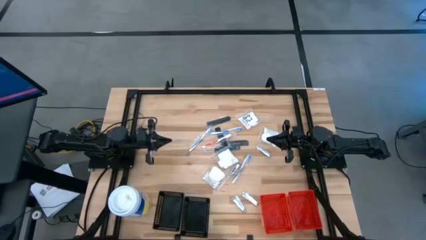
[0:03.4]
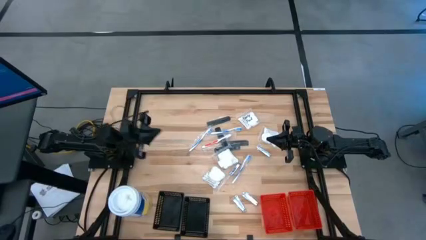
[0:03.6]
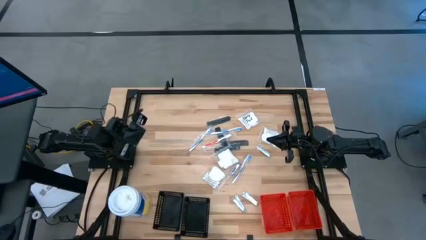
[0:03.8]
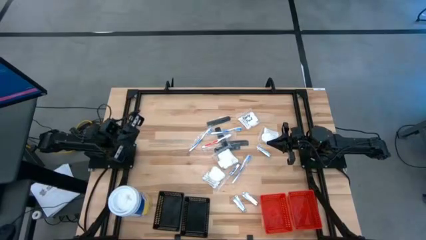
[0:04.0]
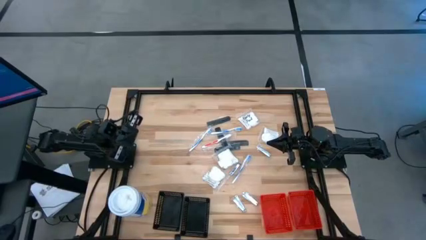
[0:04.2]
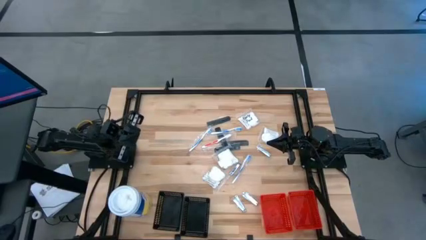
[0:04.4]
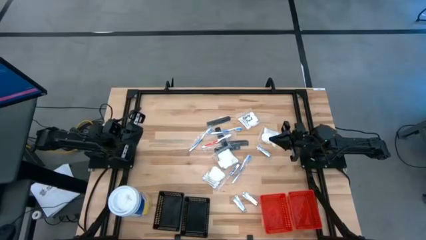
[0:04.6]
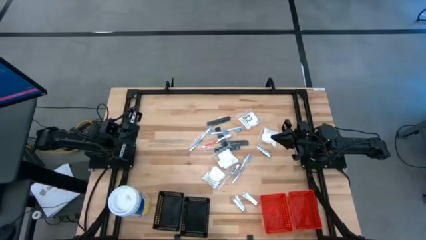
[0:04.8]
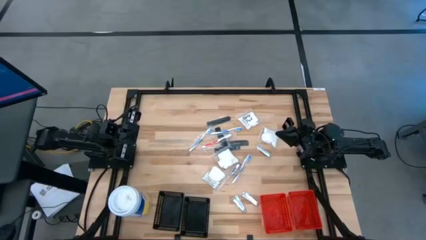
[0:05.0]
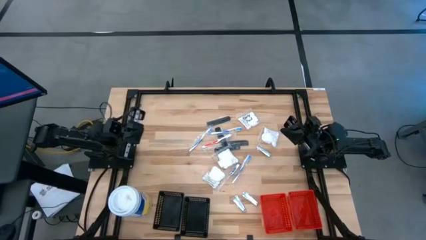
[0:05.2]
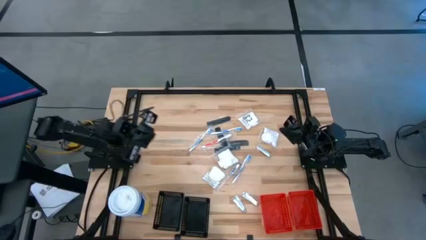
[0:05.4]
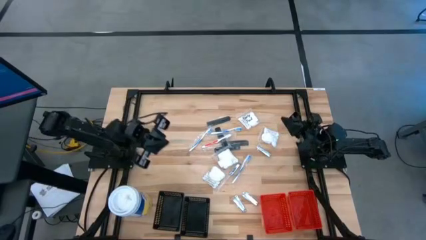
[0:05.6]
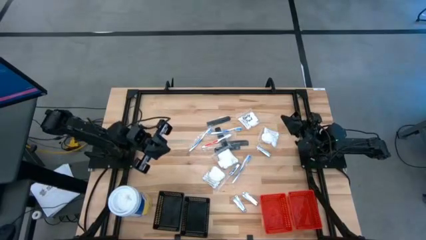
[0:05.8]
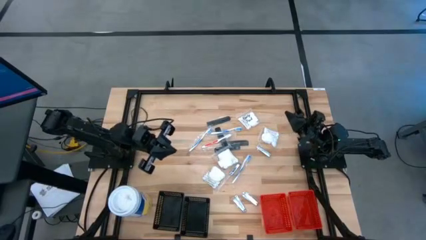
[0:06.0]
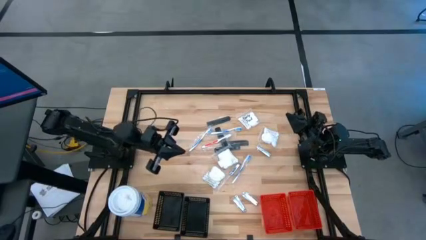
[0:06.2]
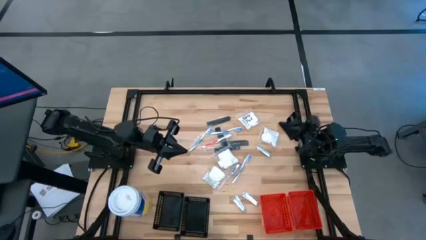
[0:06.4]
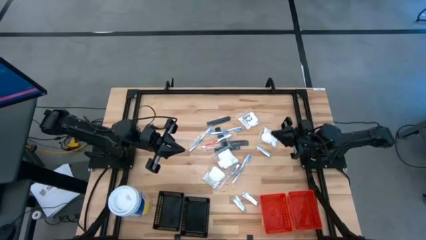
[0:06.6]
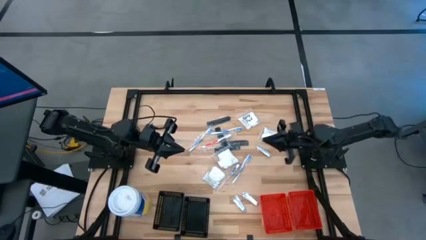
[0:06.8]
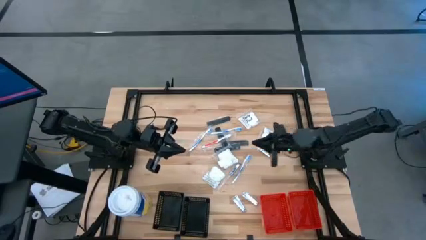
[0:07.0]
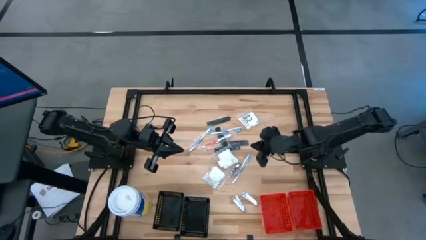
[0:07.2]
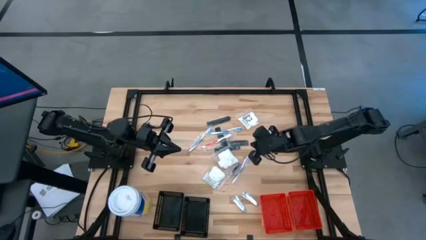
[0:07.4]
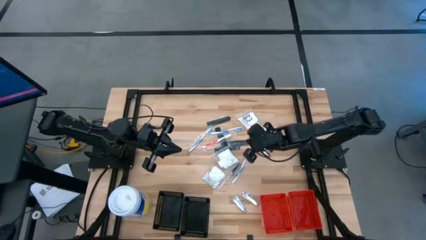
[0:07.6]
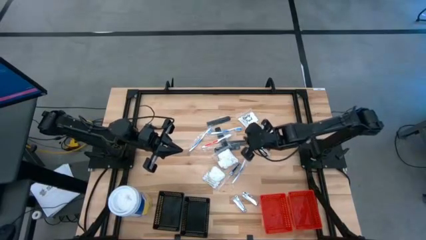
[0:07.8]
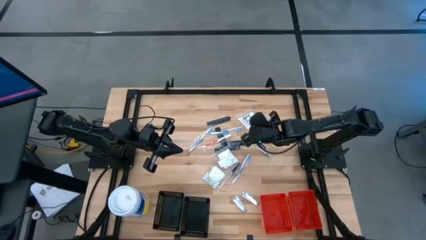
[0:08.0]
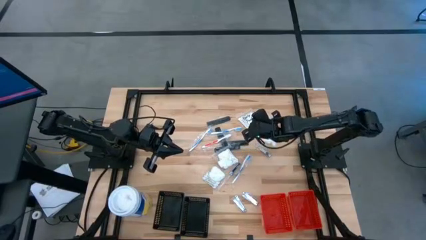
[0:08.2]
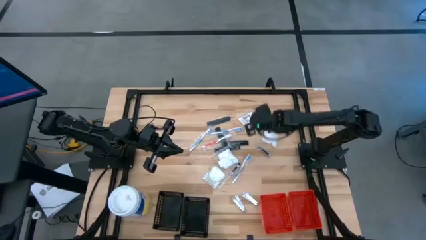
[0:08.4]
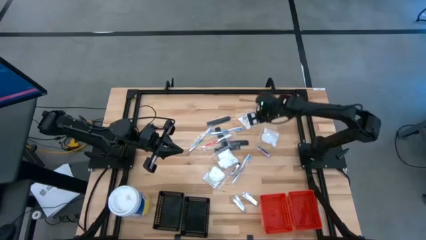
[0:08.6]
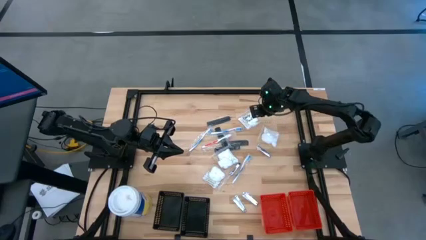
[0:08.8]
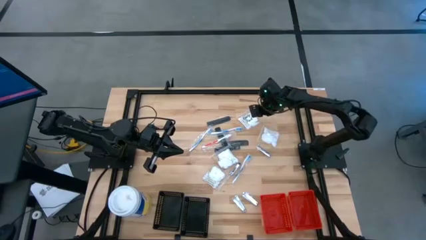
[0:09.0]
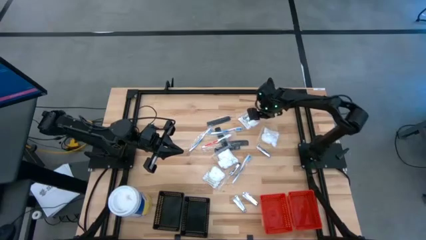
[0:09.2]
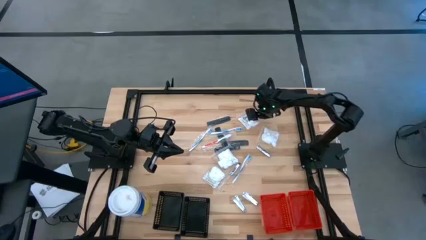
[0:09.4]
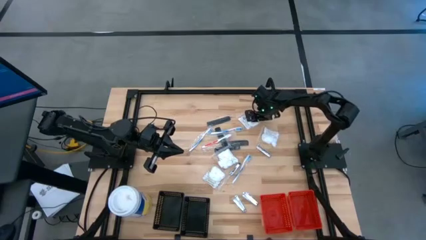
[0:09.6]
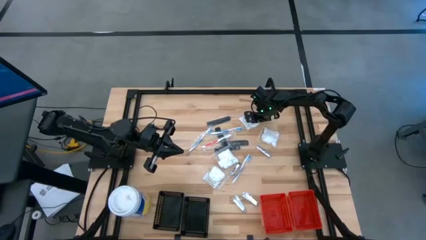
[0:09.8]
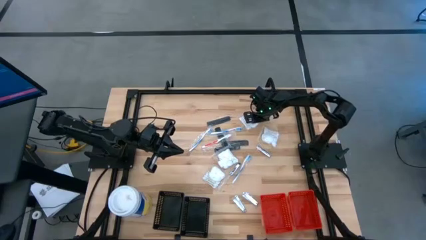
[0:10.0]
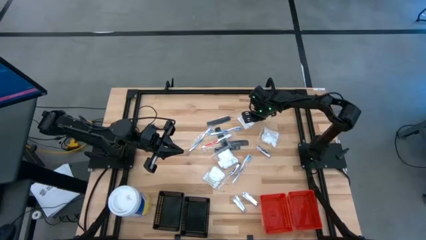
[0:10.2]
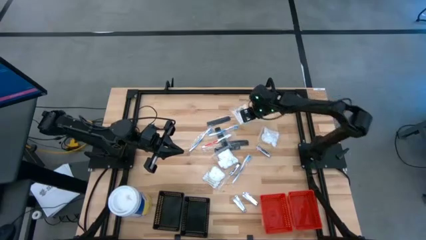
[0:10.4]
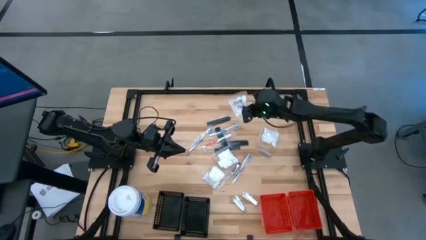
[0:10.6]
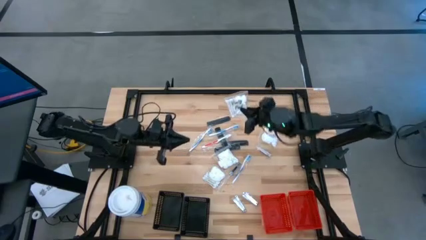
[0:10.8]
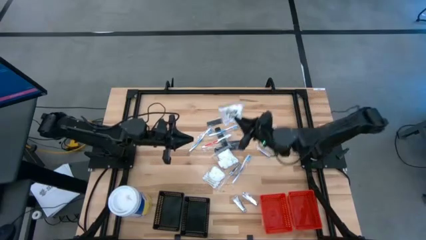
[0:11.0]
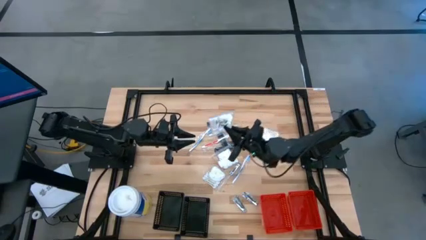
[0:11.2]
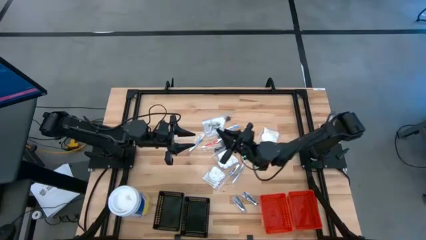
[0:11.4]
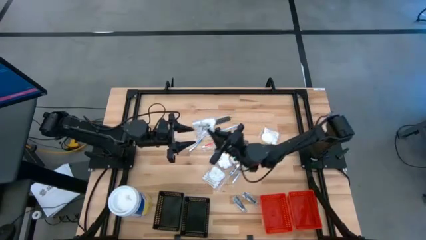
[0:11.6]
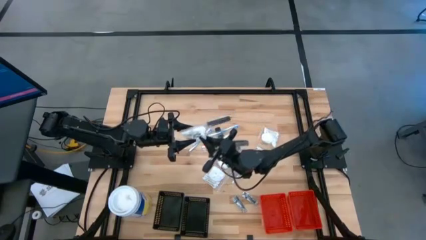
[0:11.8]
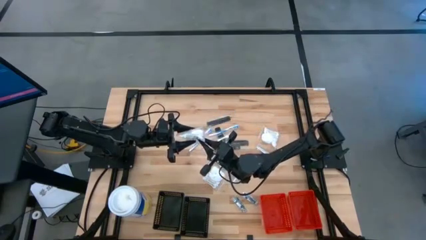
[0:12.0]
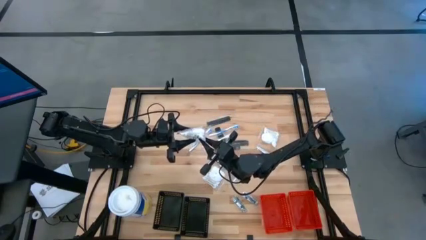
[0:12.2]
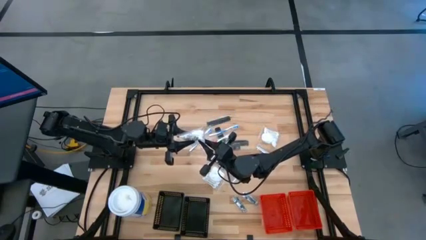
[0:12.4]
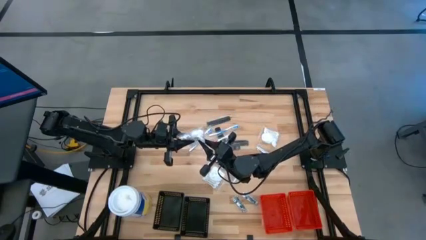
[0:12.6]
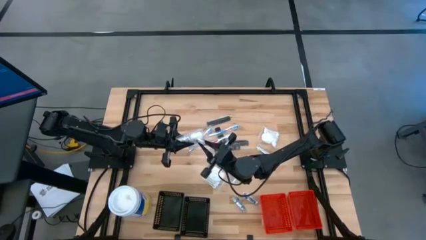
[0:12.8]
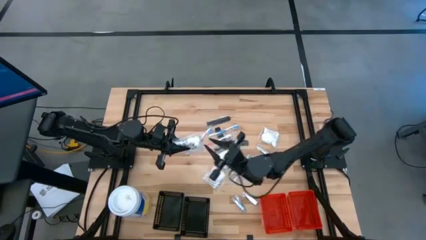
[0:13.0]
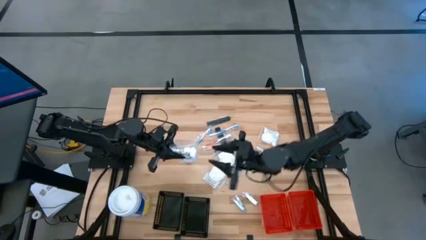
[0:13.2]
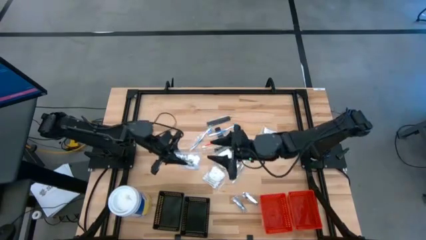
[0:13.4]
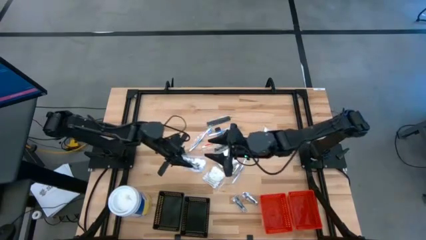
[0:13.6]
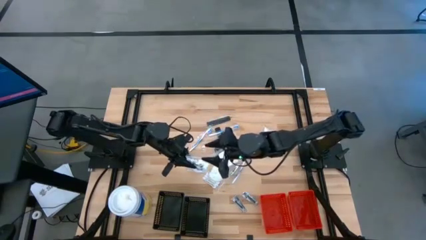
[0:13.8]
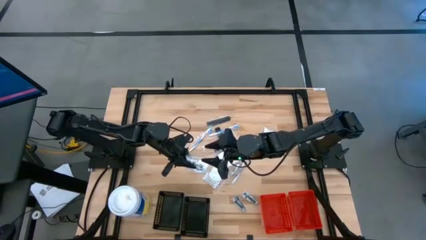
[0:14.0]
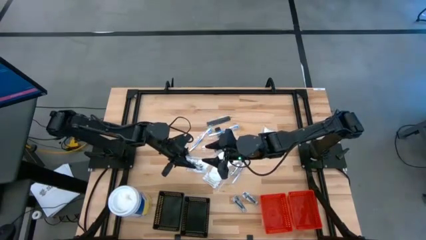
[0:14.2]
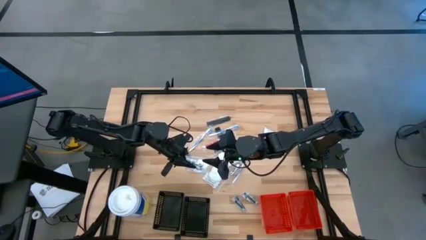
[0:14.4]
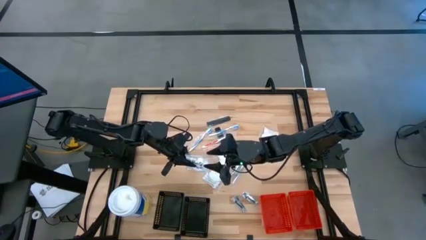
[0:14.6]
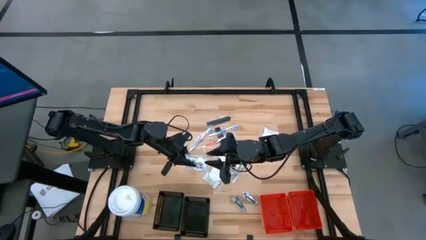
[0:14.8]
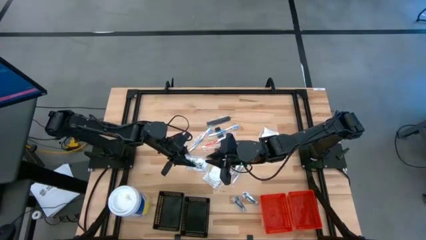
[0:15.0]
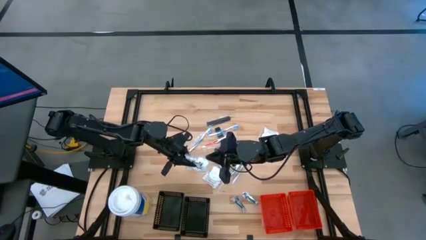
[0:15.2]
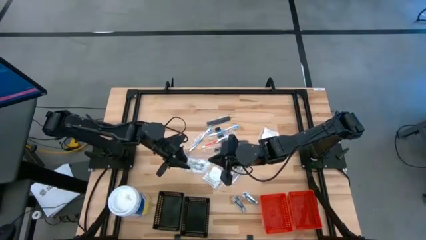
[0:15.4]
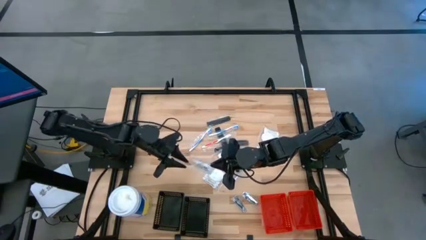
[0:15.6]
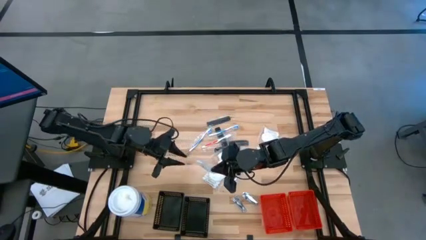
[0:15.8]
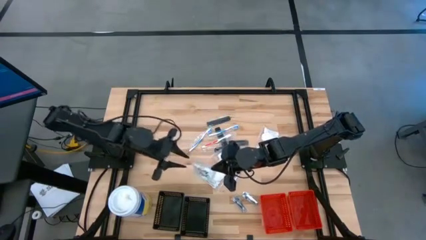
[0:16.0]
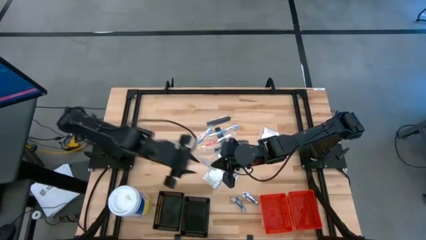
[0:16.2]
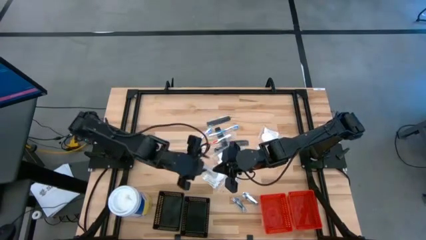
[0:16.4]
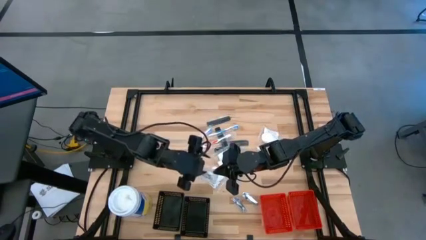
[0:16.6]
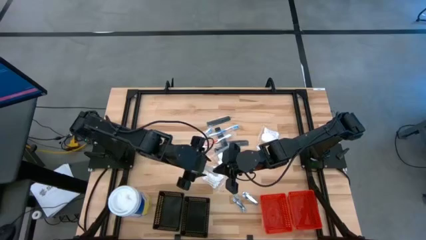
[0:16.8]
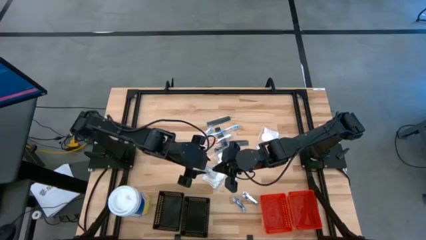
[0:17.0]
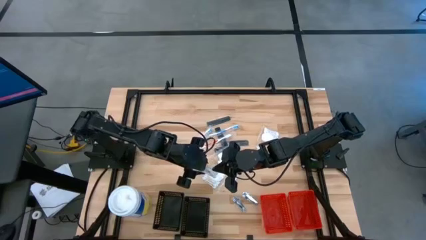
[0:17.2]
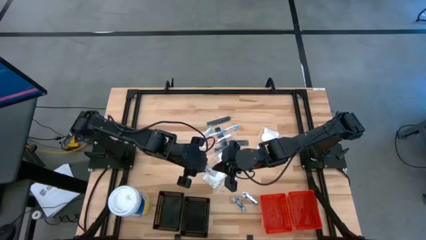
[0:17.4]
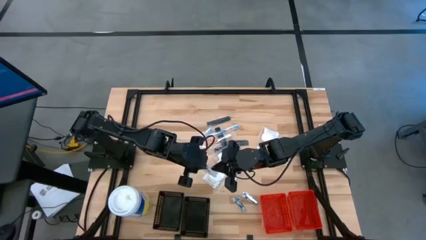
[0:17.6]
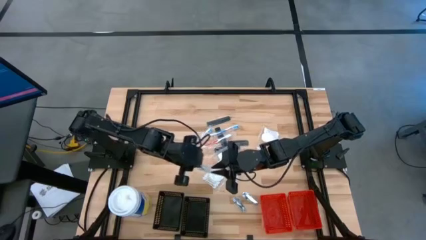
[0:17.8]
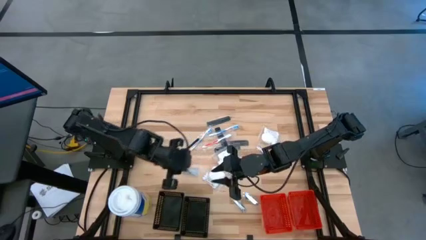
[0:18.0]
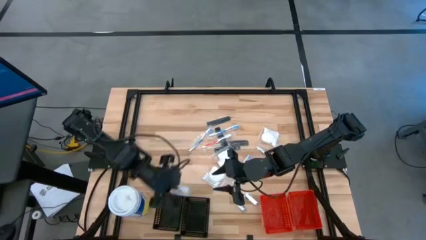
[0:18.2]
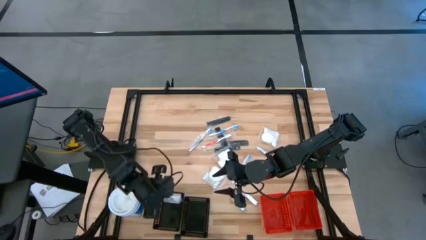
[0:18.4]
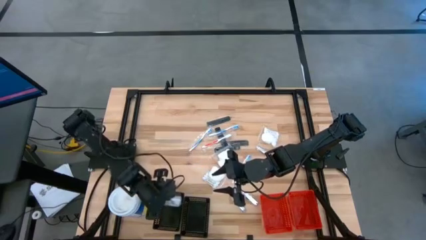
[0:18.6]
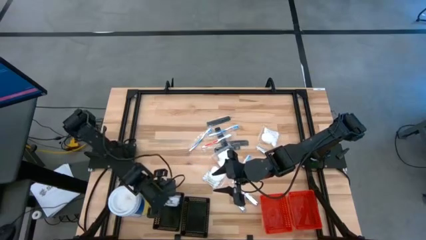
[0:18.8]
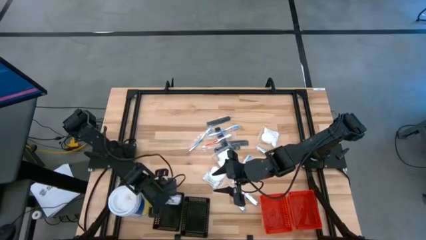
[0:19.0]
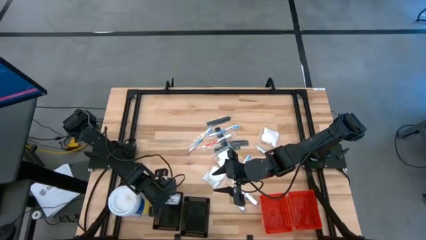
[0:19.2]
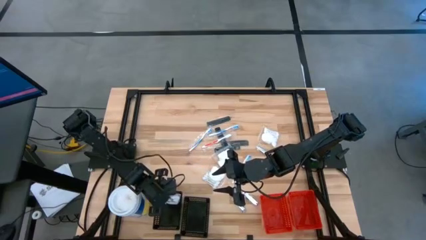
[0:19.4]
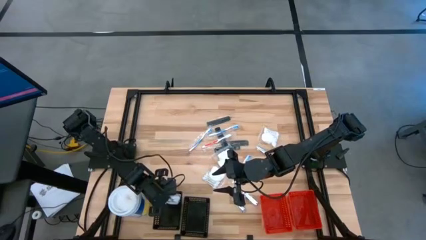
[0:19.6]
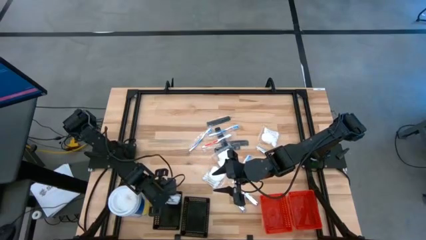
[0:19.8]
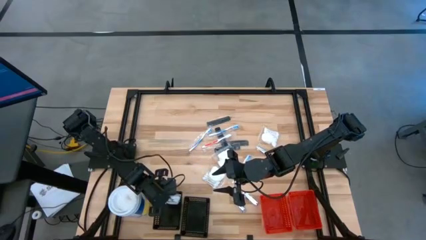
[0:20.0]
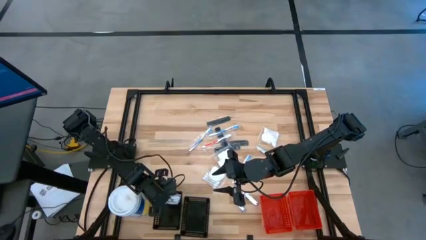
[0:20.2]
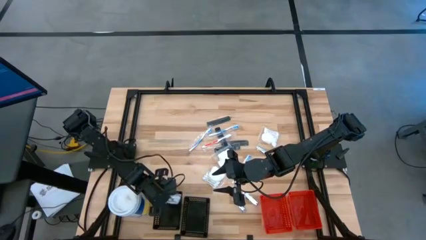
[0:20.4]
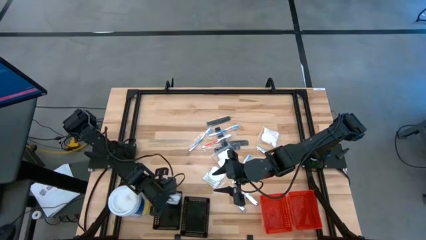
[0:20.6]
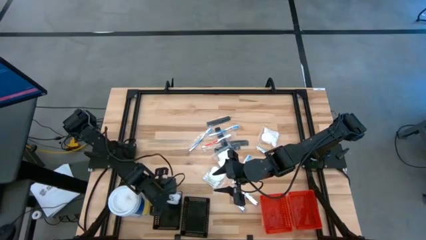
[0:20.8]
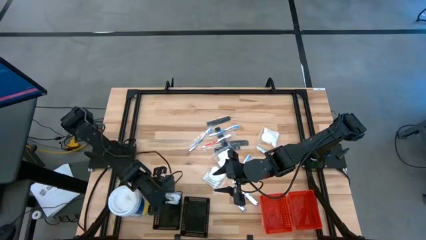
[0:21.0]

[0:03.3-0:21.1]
Task: Pick & Place Travel size toiletries
Put the cotton pack into the left black bin
